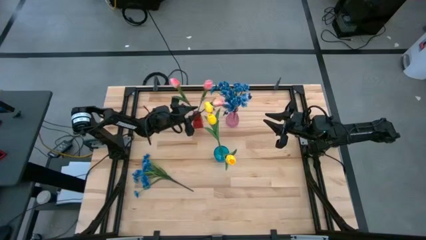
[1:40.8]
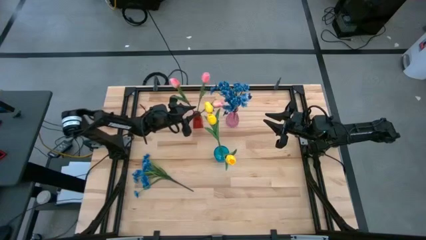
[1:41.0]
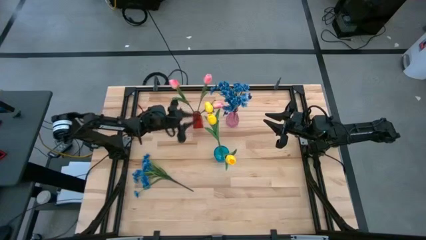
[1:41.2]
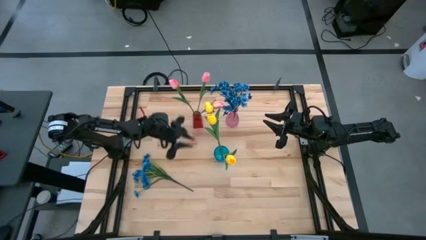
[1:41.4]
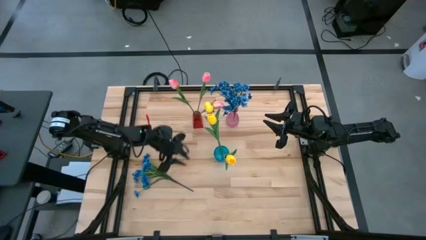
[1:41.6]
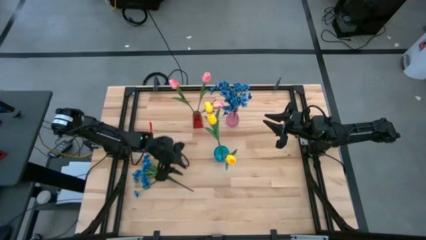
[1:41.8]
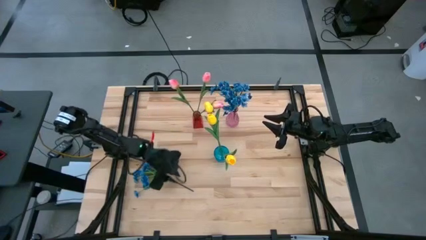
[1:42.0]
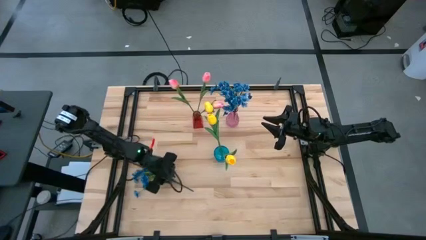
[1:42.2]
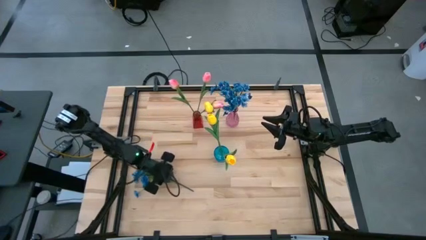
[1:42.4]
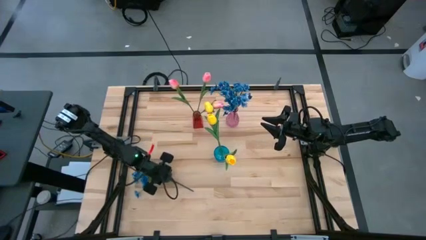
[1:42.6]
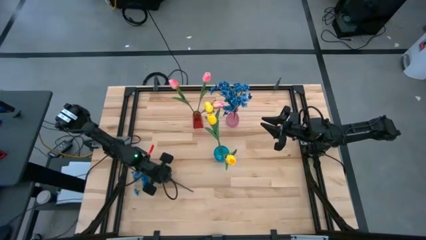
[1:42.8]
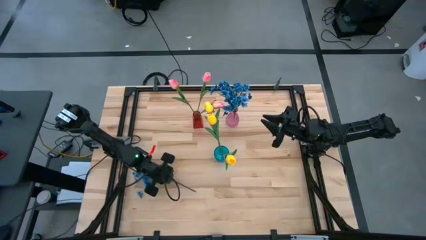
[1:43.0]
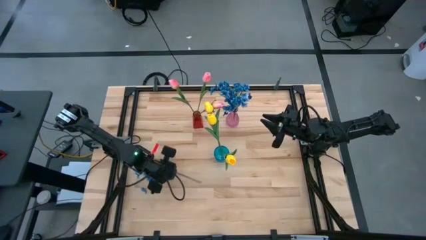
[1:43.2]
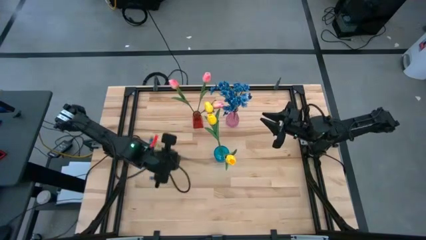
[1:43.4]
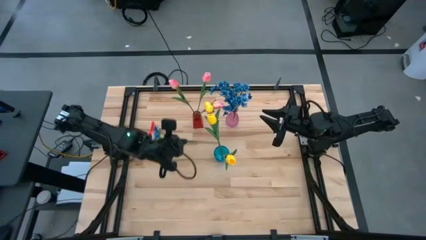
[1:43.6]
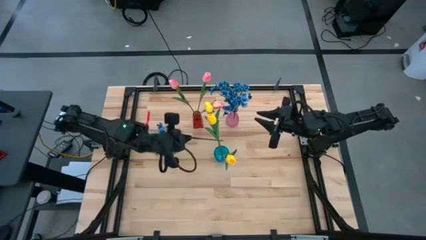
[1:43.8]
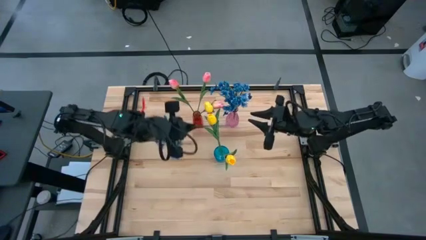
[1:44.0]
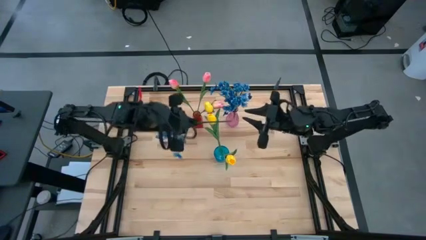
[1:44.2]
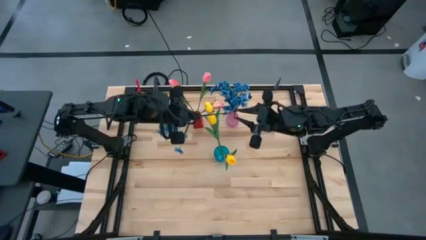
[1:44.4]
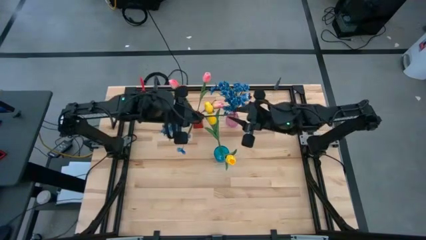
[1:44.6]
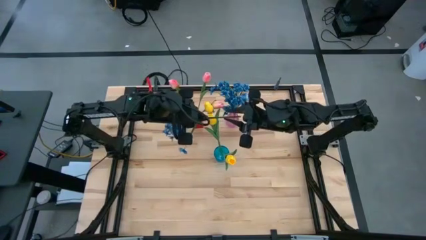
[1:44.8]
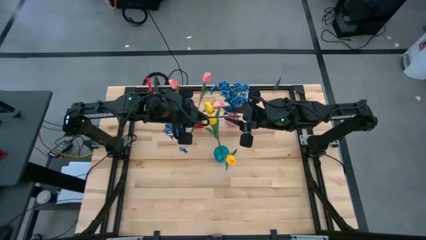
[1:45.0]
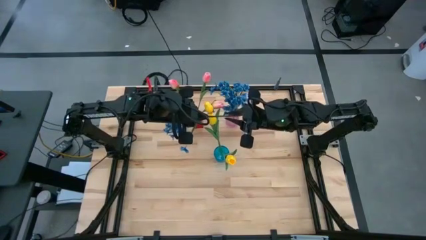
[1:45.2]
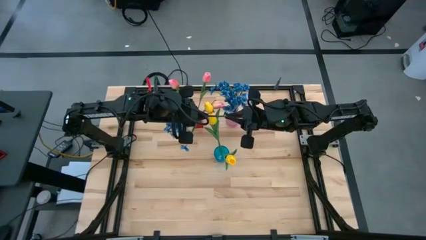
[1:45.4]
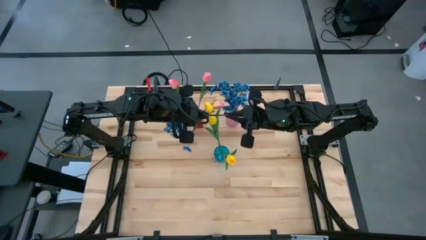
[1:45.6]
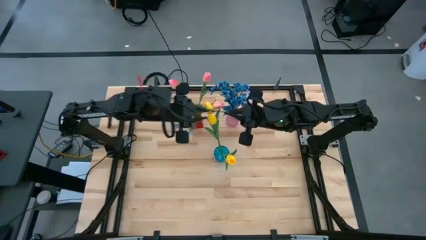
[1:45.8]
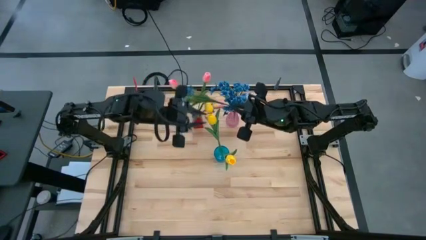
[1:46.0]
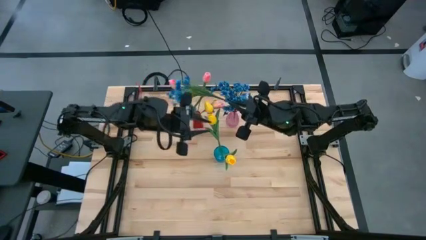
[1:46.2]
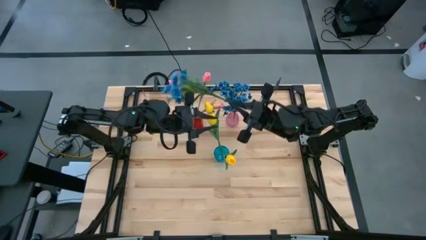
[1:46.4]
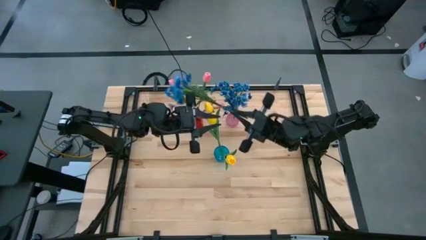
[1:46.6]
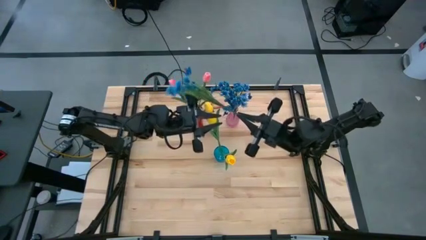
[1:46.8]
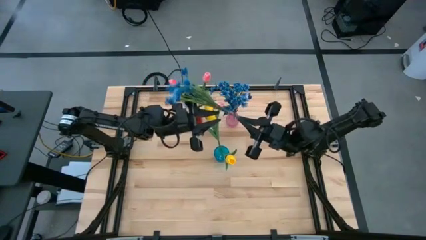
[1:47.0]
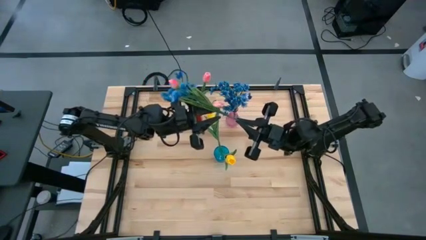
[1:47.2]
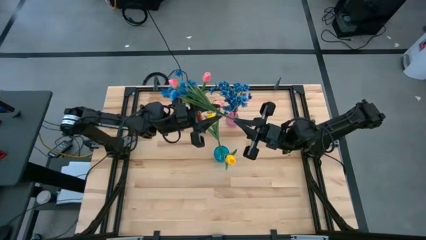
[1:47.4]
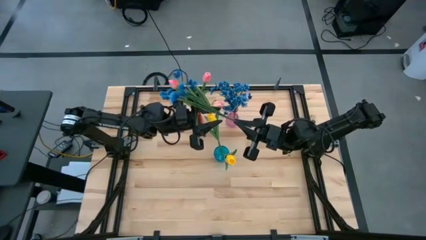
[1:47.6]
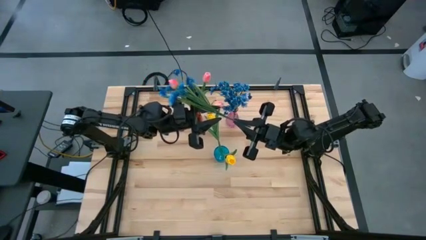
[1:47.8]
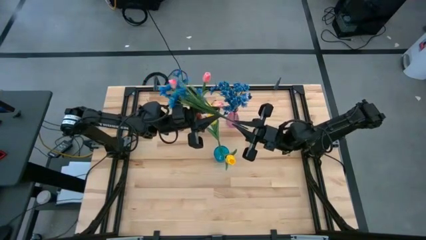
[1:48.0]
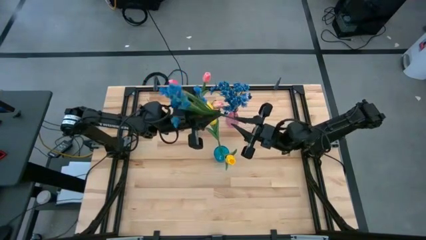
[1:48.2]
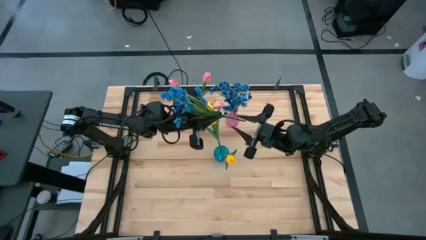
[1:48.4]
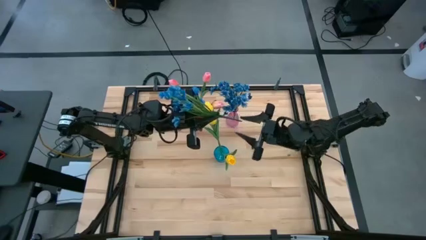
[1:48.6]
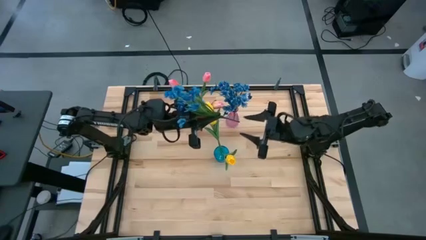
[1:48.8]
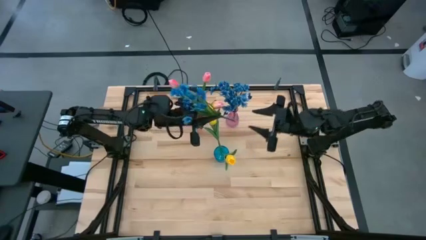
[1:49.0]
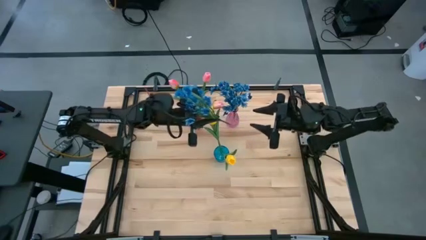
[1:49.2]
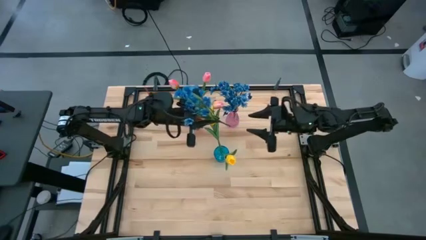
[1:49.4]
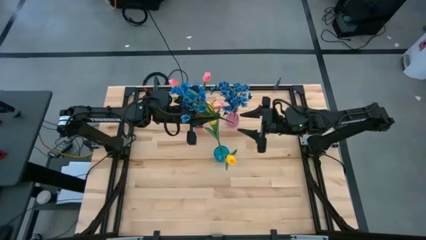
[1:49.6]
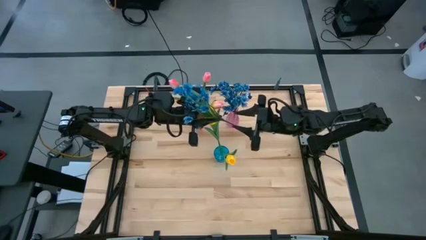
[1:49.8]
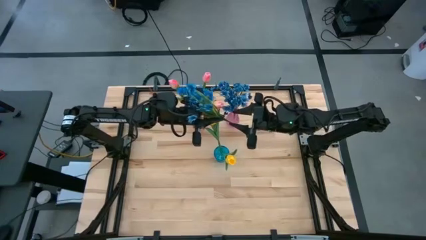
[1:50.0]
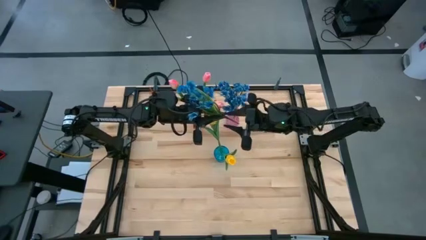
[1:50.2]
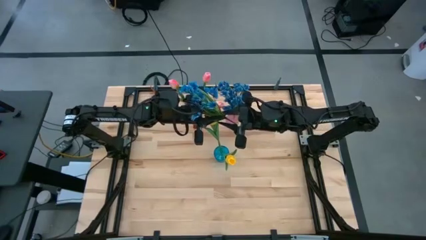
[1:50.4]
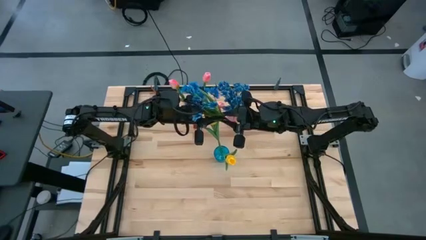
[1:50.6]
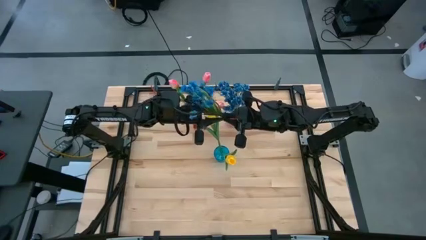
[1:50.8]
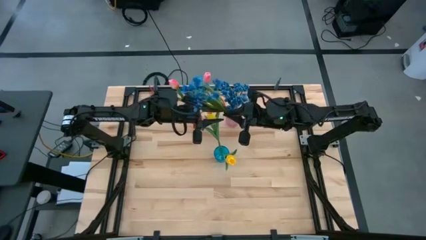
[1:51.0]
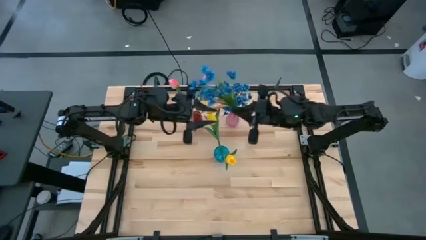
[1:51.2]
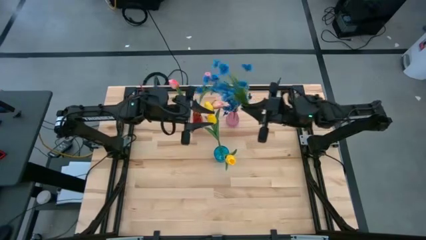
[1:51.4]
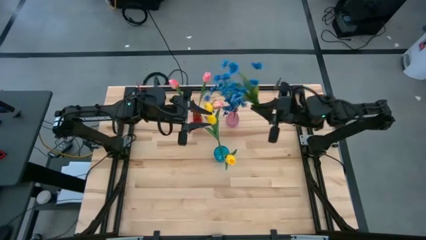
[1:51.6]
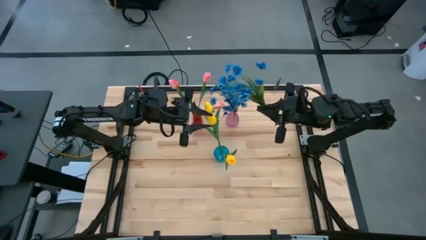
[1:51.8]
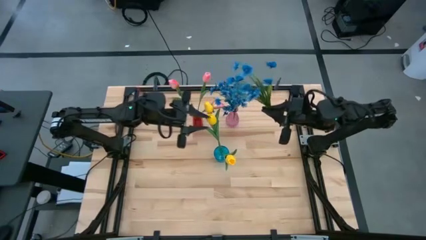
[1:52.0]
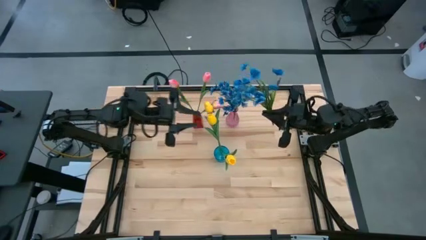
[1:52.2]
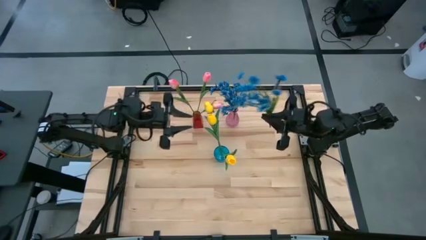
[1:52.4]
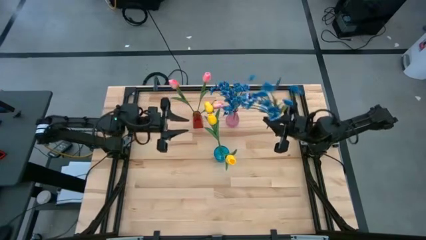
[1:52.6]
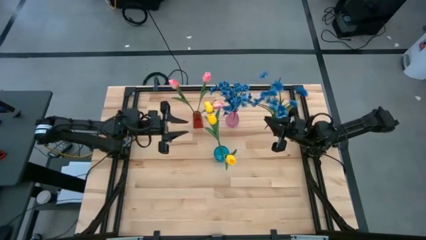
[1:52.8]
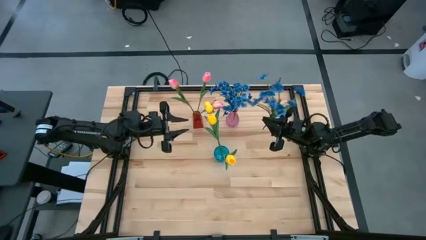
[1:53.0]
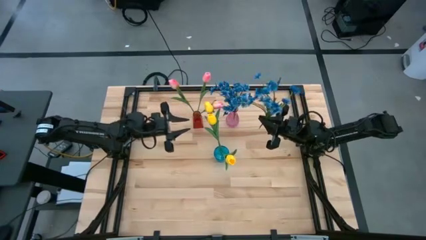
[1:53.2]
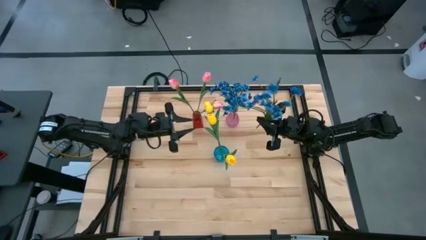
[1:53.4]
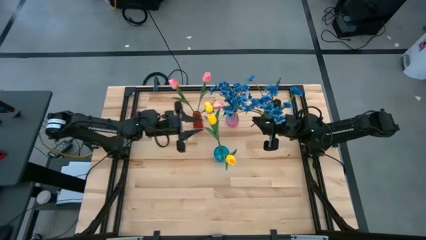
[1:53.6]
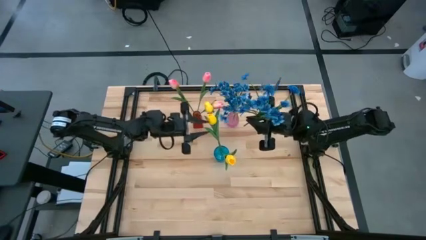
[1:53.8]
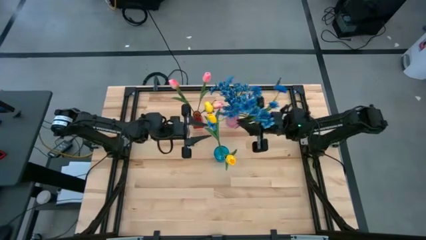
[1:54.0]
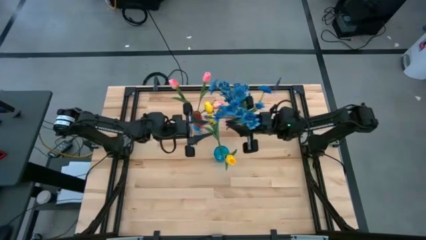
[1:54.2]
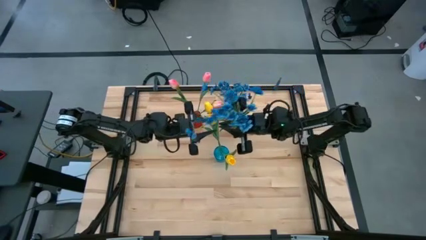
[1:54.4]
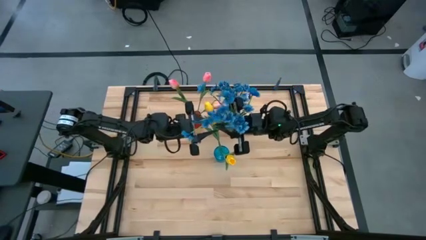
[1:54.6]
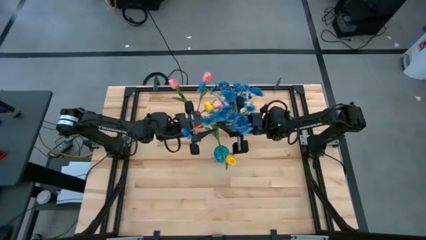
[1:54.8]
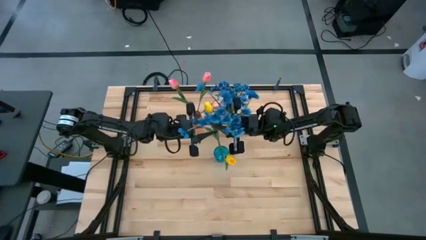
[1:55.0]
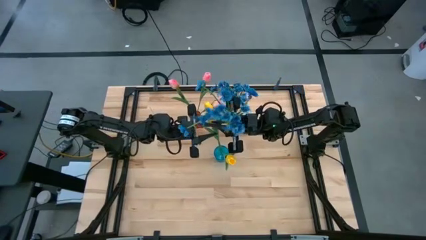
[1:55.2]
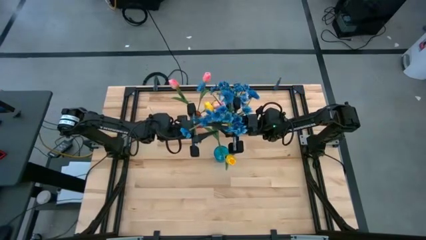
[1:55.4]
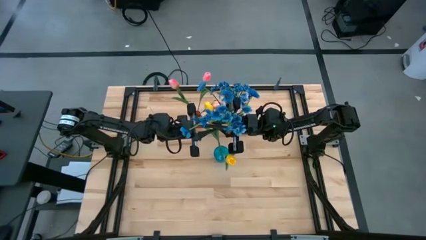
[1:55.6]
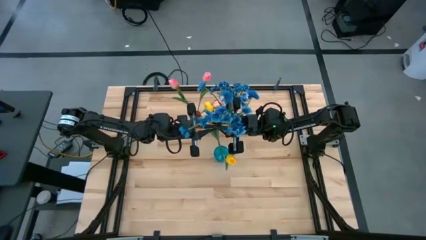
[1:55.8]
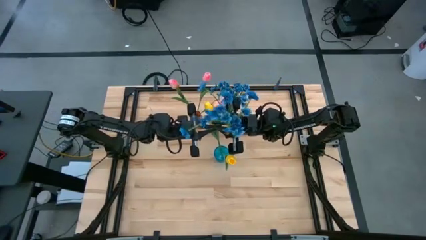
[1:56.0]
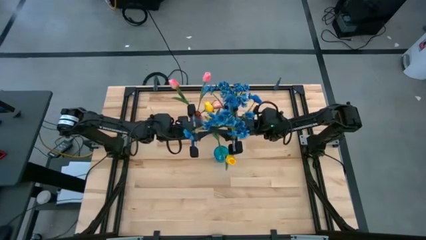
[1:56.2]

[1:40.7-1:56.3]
Task: Sort flowers into vase by color
Put the blue flowers into the pink vase
